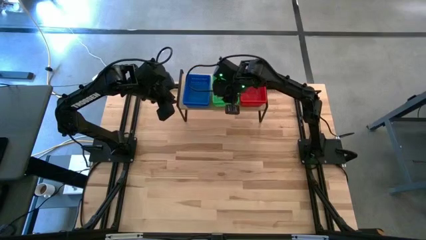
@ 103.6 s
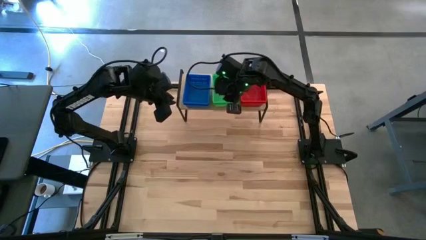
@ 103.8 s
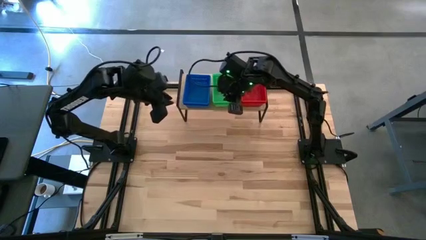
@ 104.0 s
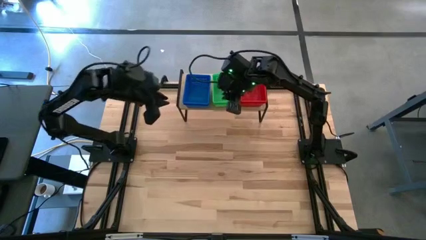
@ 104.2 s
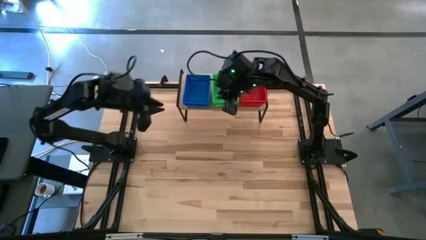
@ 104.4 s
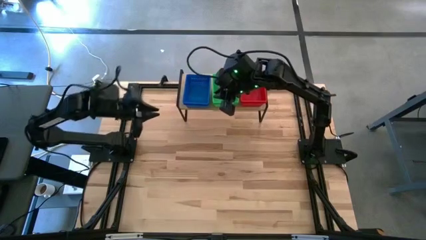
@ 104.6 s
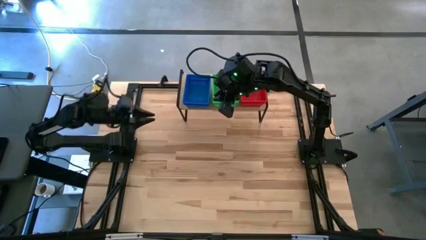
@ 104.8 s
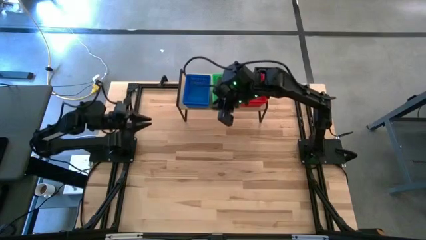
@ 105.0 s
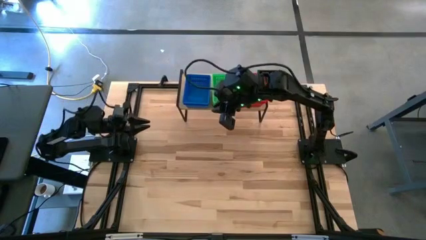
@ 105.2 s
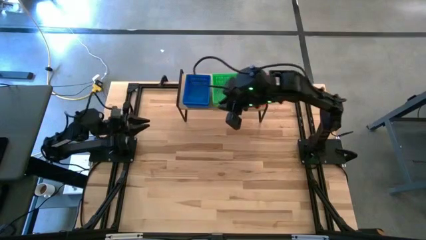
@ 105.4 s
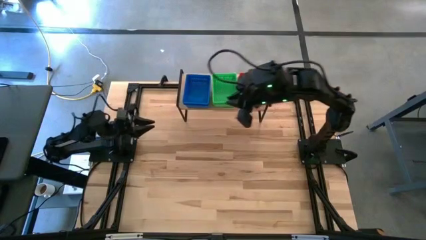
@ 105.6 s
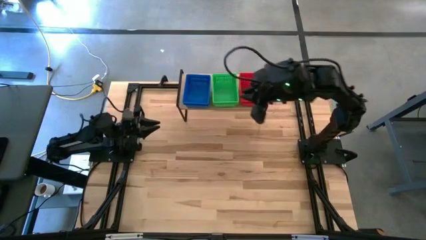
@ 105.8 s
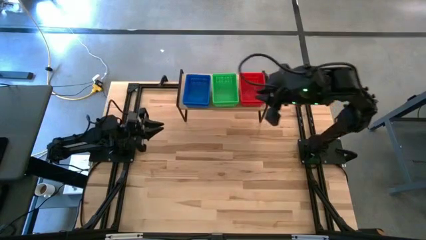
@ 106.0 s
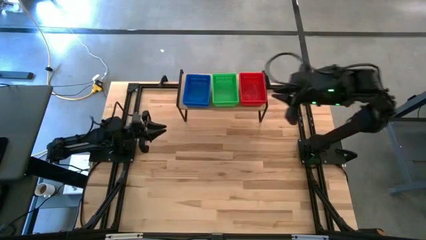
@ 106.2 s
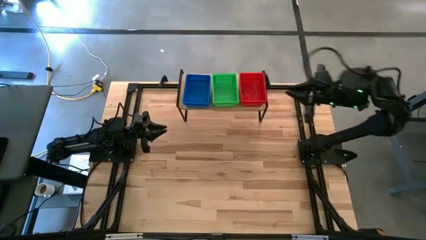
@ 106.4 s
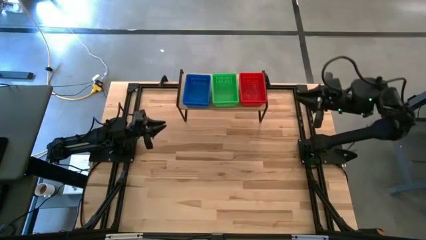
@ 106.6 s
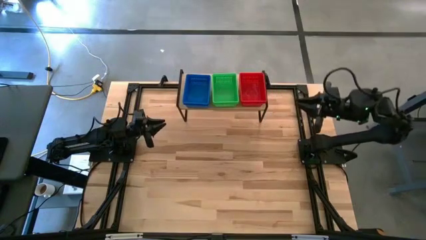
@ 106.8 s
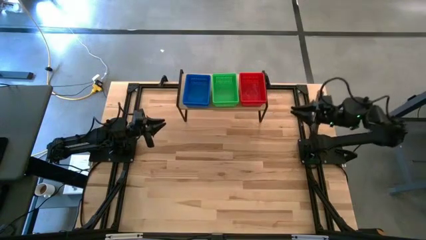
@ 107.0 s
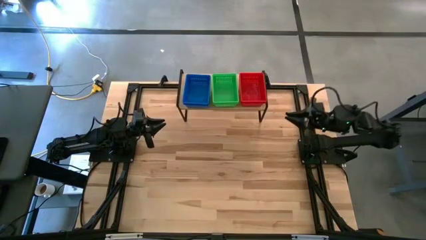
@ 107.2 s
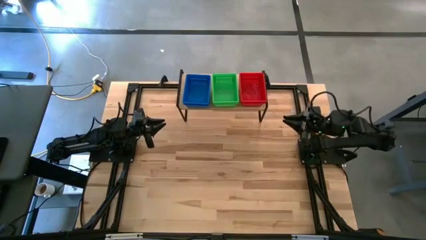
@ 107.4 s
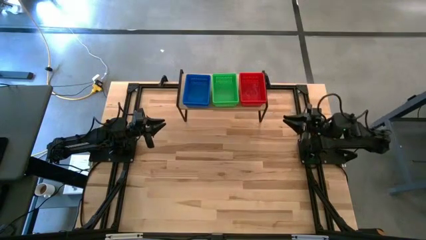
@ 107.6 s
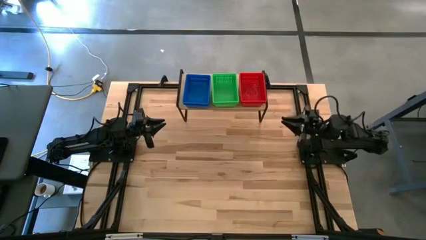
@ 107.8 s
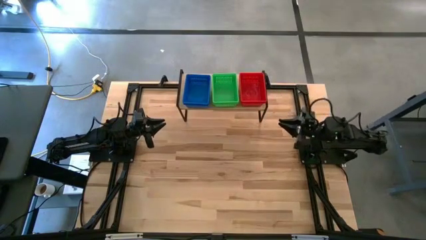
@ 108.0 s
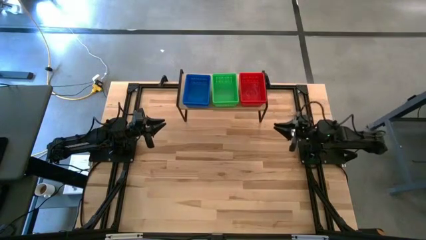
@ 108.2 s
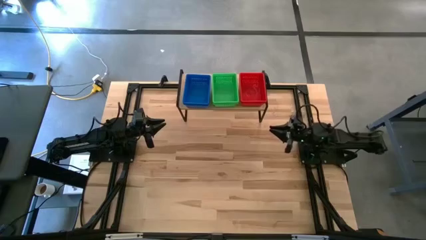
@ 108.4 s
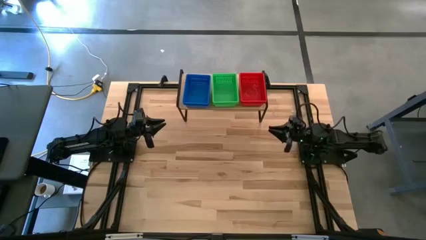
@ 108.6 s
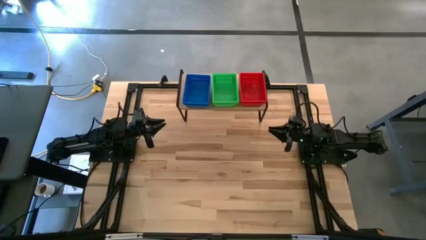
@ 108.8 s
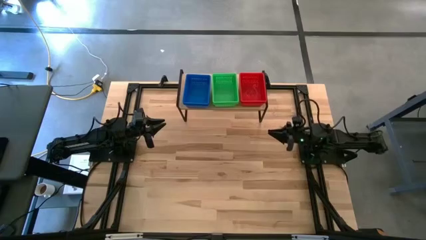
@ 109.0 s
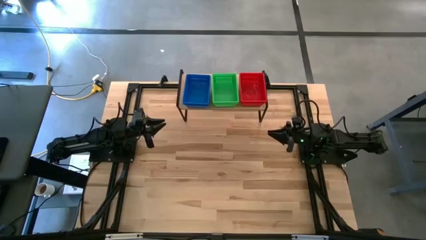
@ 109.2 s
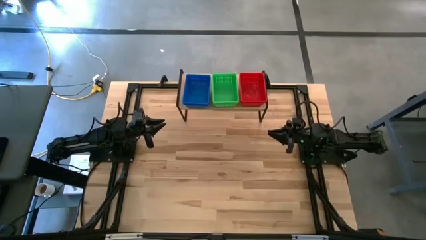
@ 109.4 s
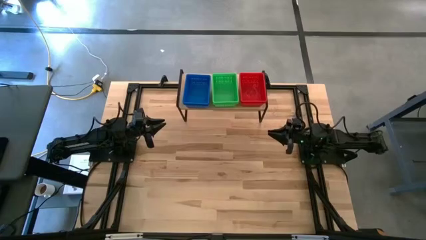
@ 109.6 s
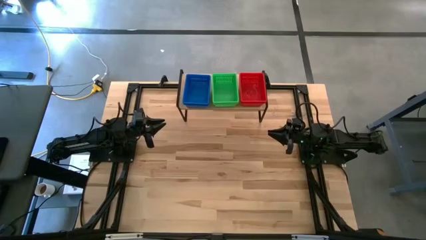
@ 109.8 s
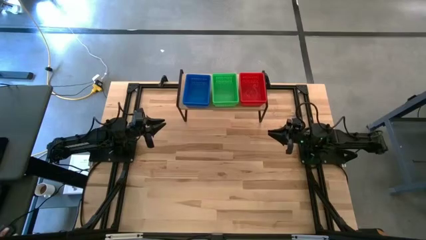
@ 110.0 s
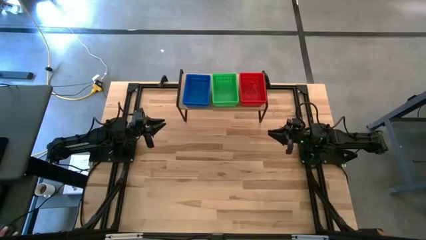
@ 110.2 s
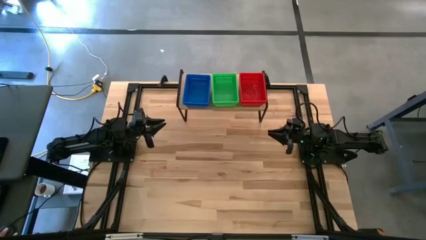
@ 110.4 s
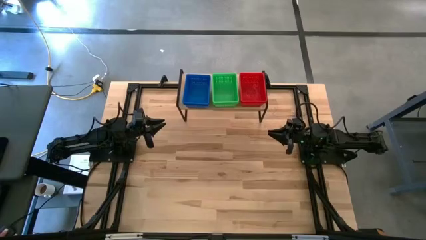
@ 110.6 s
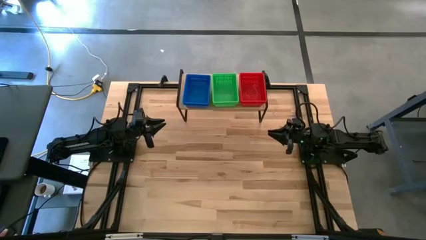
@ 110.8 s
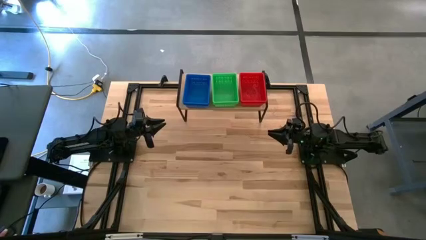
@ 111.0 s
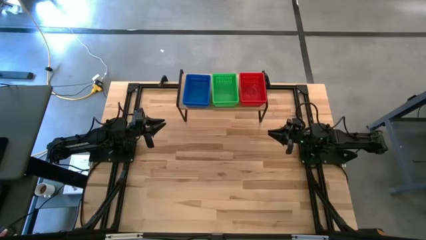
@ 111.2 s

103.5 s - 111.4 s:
Task: Stack baskets on shelf by color
Return to home position

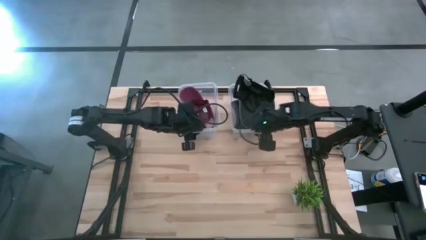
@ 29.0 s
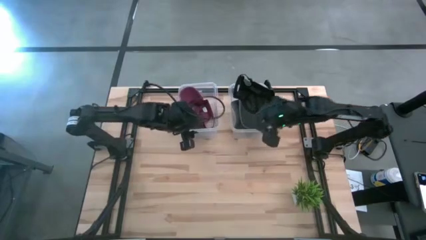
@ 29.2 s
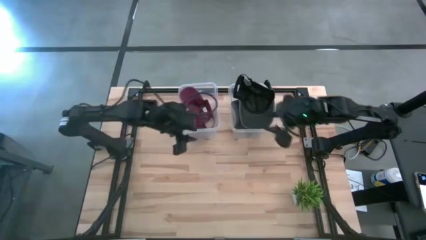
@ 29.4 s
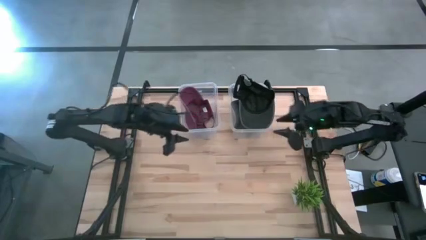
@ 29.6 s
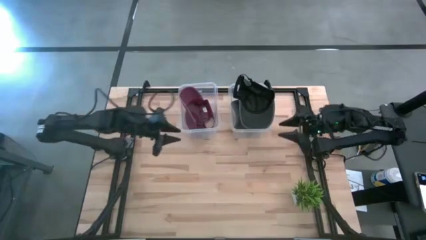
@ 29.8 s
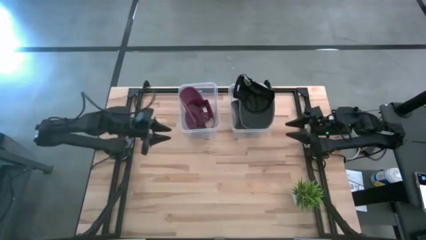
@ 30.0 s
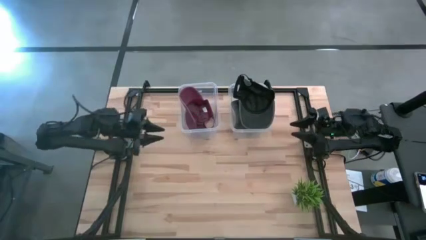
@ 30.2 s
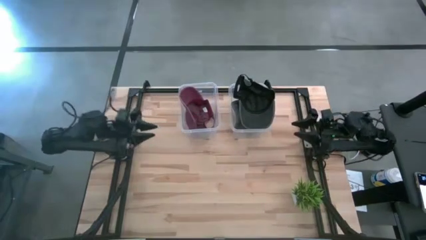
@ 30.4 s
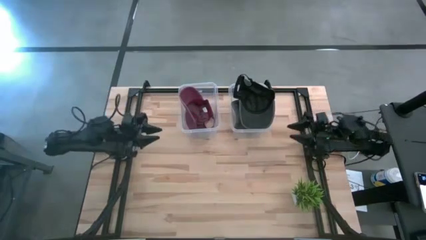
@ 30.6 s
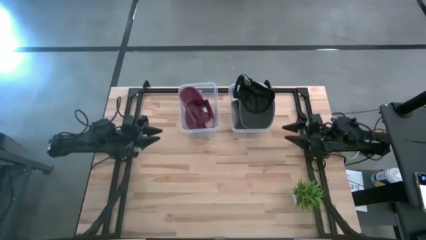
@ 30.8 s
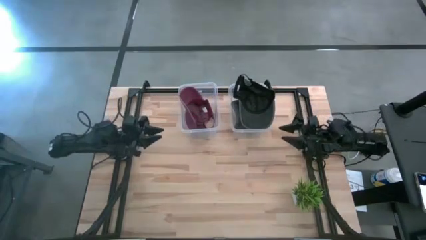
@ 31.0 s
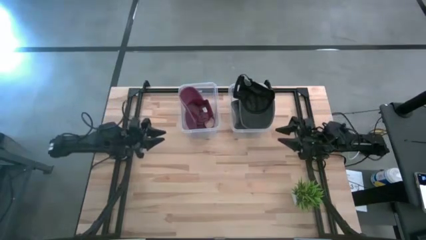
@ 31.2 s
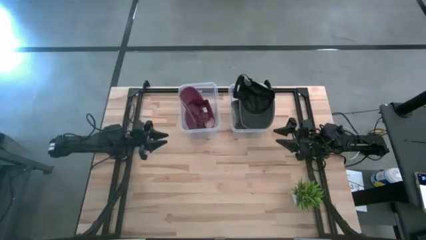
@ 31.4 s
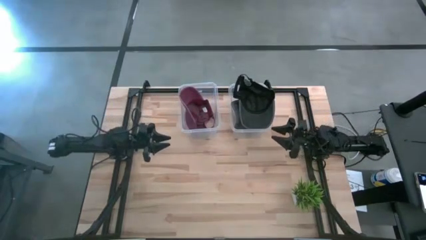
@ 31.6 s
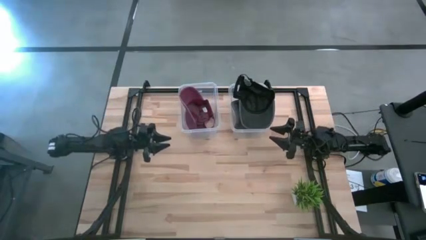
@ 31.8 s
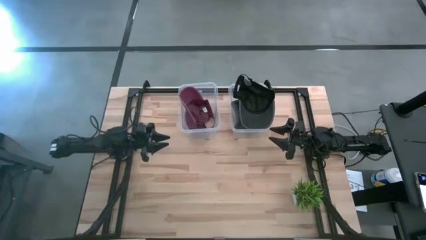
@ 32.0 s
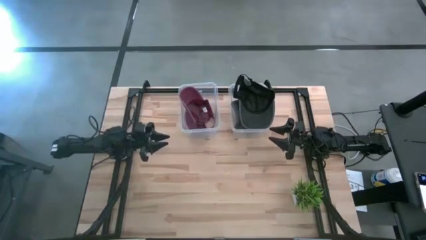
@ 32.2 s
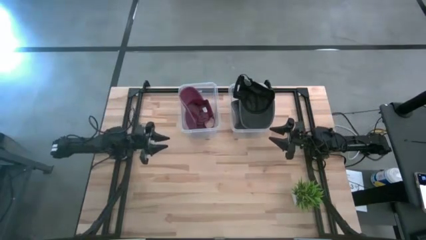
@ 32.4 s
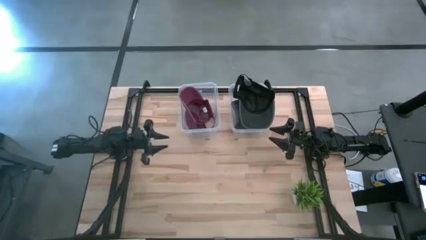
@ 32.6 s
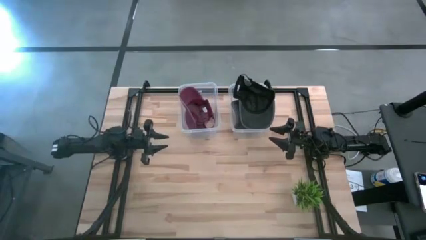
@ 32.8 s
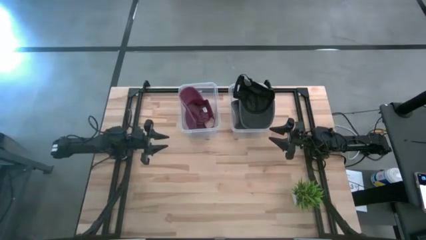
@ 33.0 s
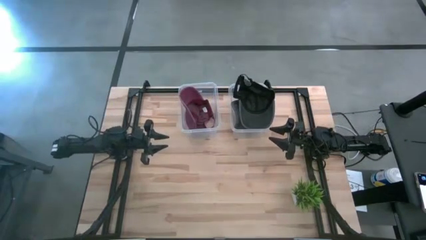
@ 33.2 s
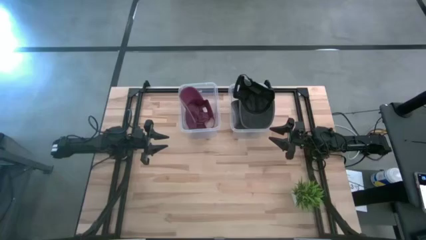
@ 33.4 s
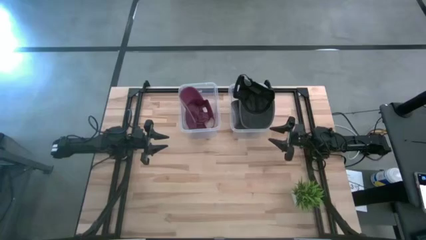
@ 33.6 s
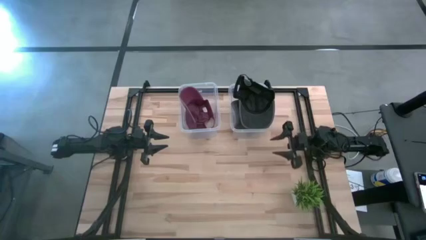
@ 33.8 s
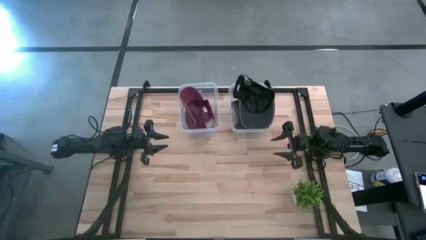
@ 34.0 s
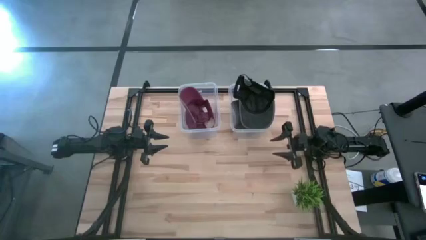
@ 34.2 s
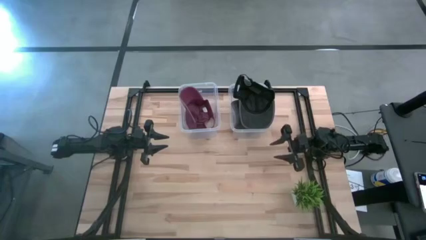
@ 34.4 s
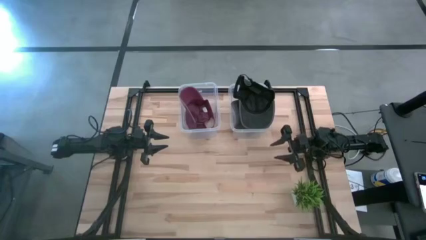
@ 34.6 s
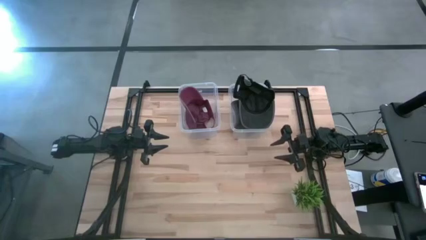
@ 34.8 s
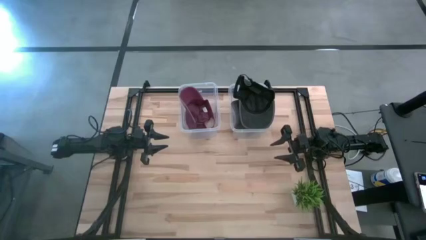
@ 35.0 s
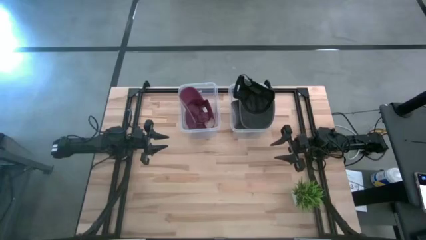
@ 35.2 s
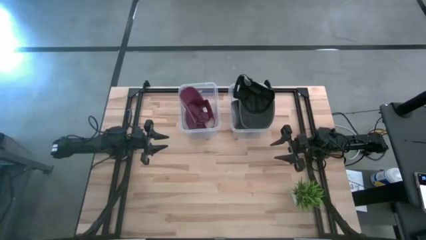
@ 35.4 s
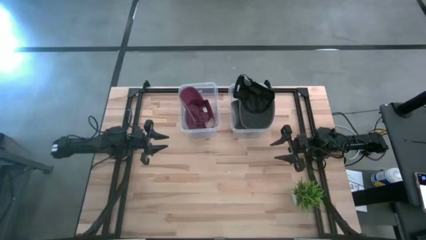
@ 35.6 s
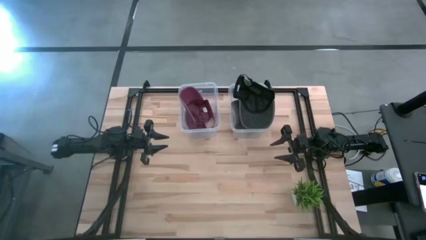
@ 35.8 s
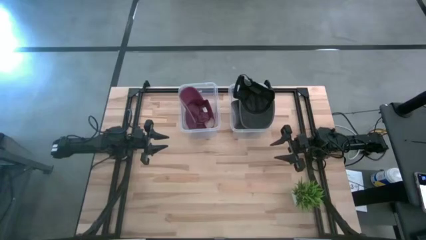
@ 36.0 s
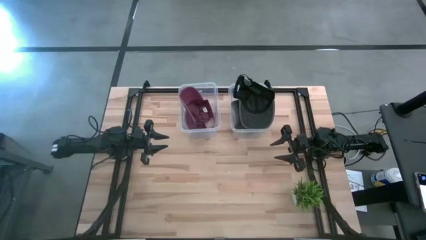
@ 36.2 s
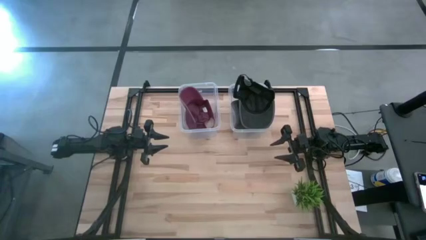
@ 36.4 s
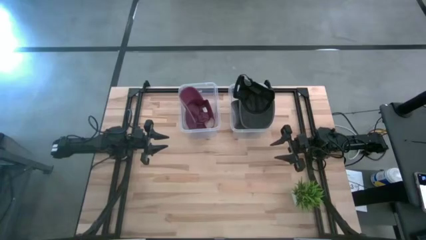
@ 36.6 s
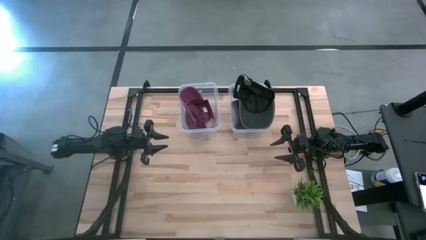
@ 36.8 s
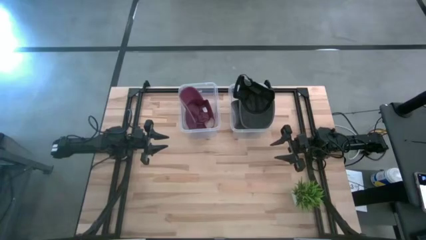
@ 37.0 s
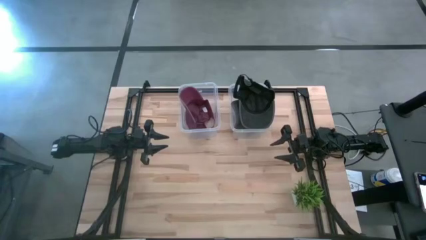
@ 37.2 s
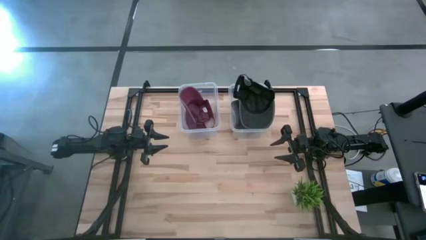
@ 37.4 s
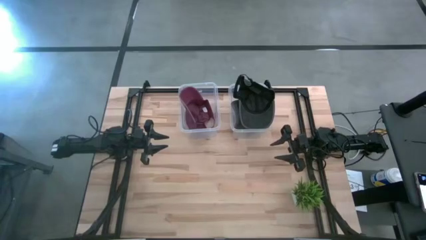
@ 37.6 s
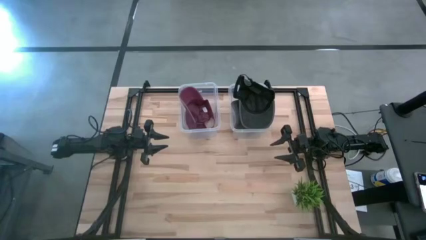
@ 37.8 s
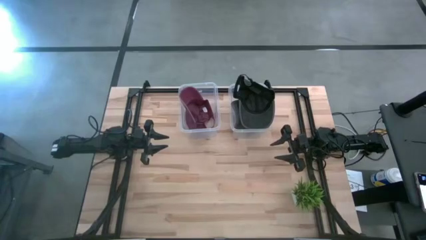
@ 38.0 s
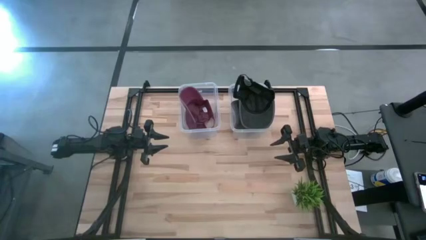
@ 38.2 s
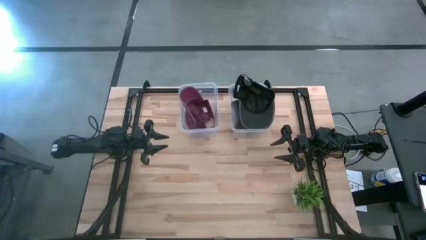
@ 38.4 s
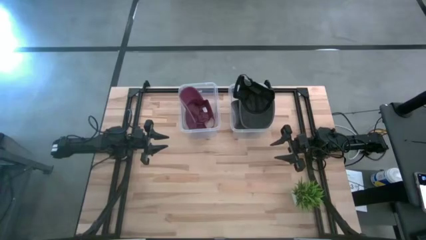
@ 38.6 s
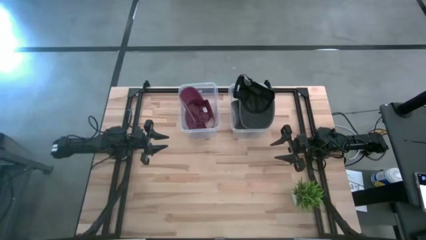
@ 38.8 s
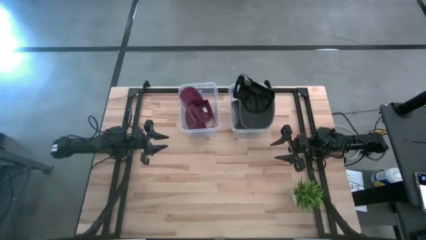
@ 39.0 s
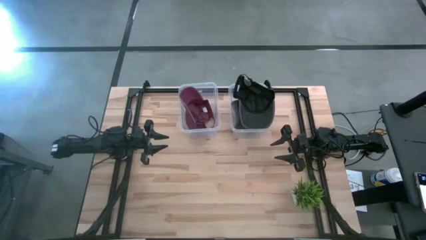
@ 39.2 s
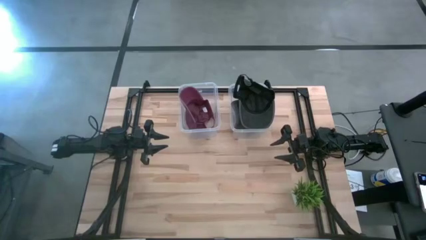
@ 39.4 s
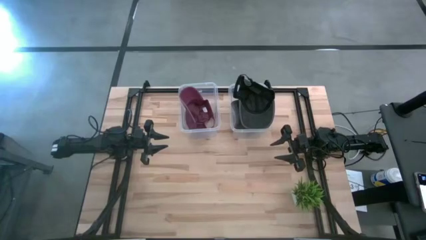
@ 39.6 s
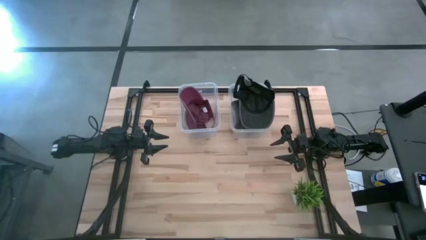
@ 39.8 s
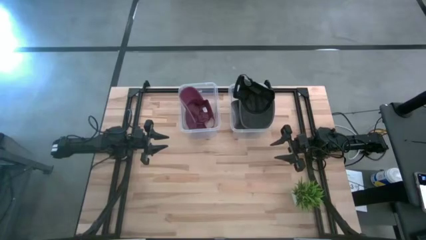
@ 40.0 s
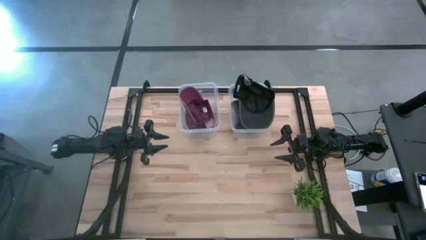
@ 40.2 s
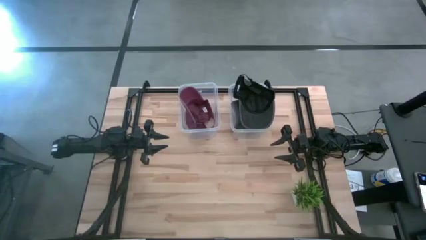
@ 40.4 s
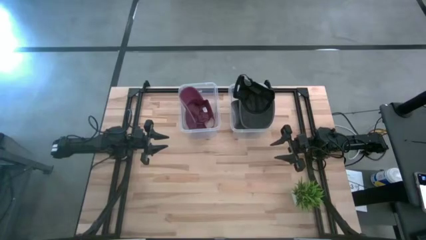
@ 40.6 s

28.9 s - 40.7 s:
Task: Pick & Place hat
Return to Home Position
